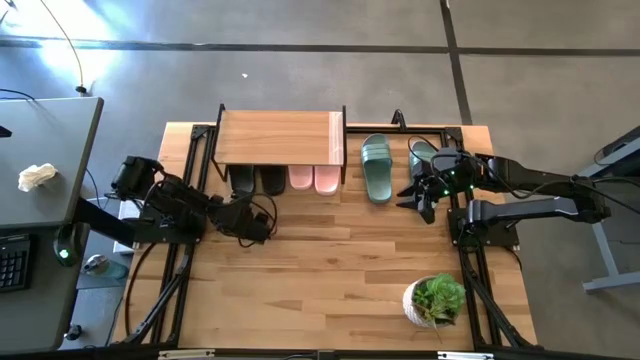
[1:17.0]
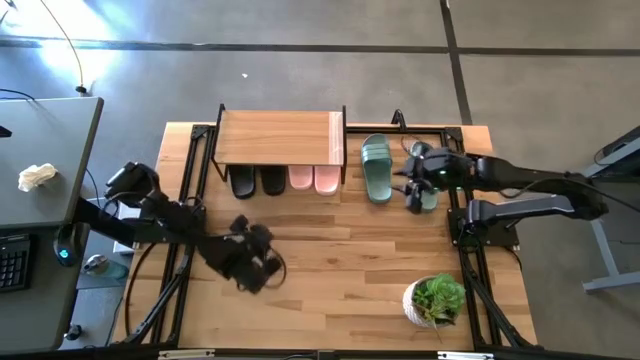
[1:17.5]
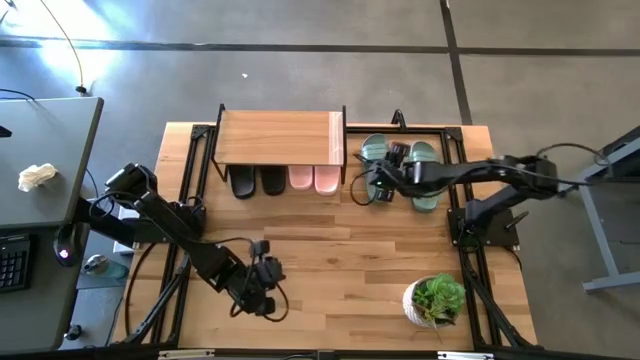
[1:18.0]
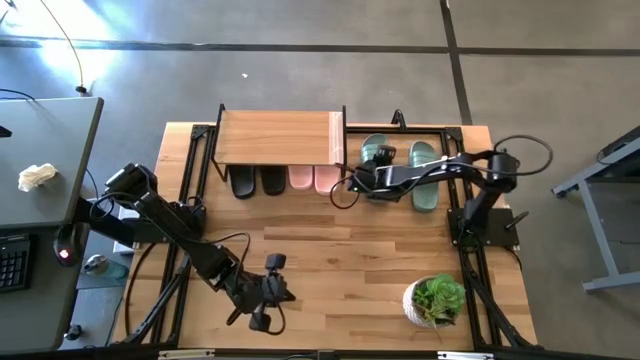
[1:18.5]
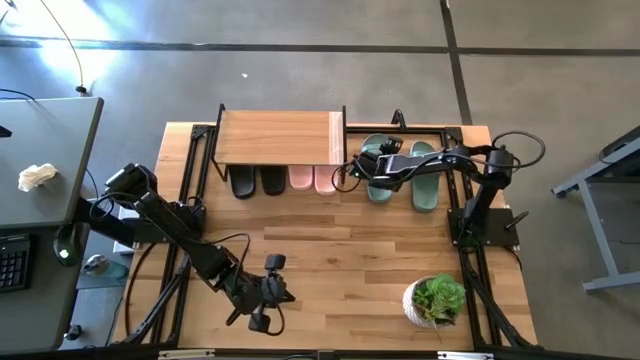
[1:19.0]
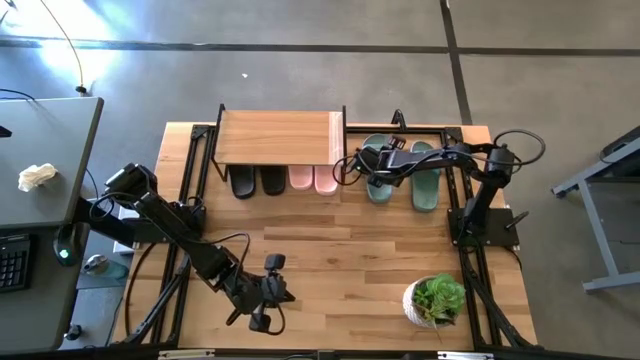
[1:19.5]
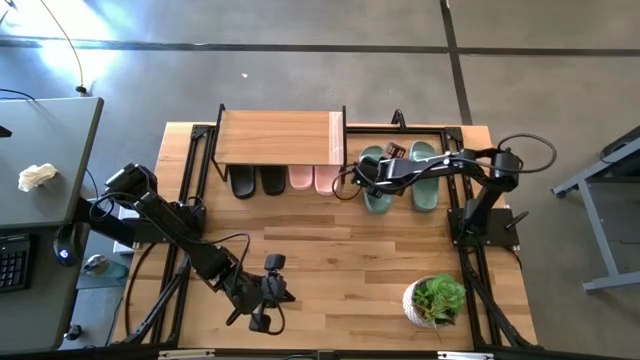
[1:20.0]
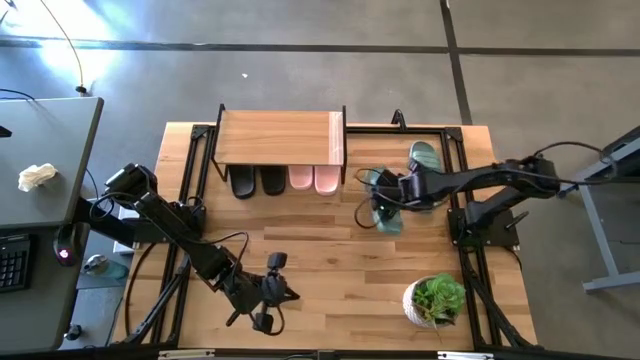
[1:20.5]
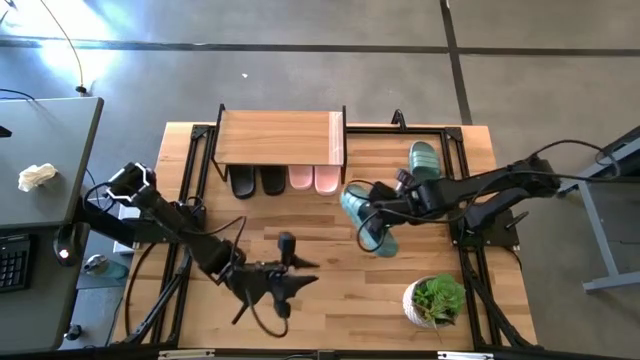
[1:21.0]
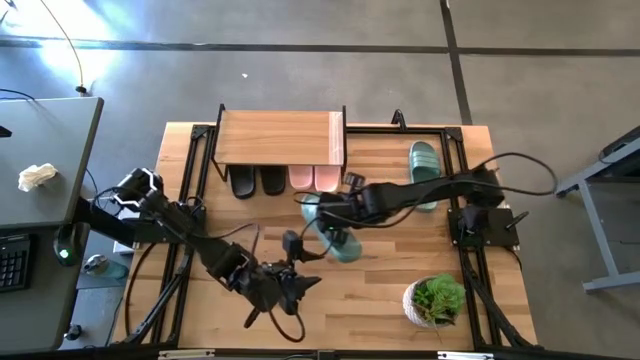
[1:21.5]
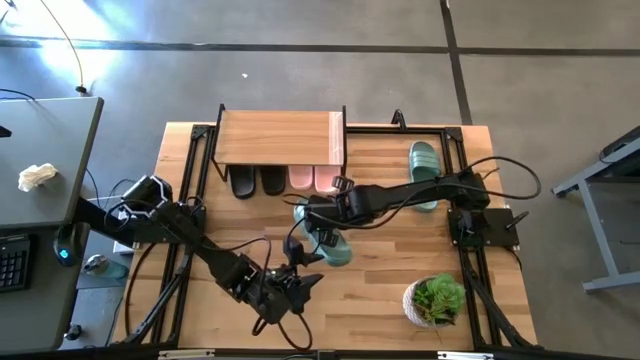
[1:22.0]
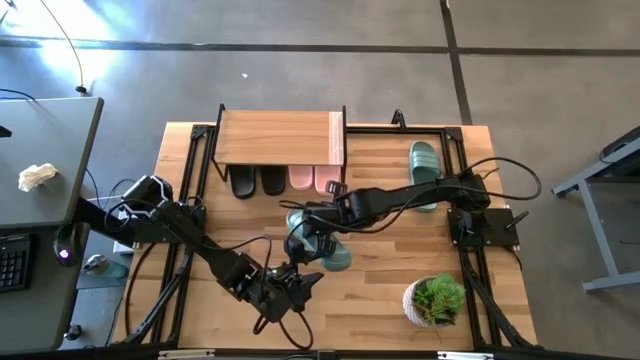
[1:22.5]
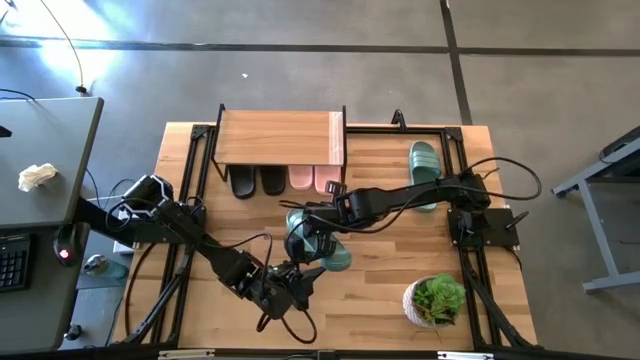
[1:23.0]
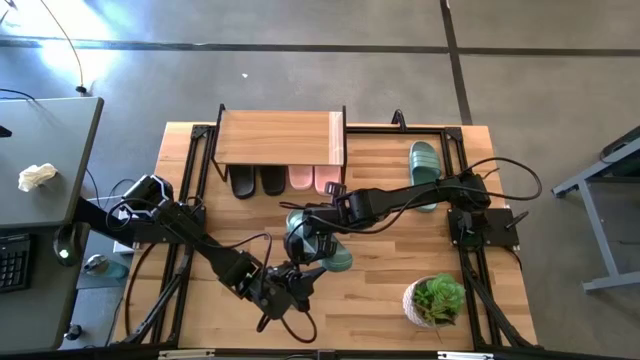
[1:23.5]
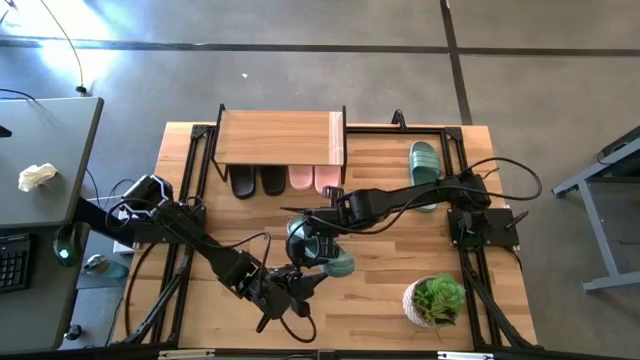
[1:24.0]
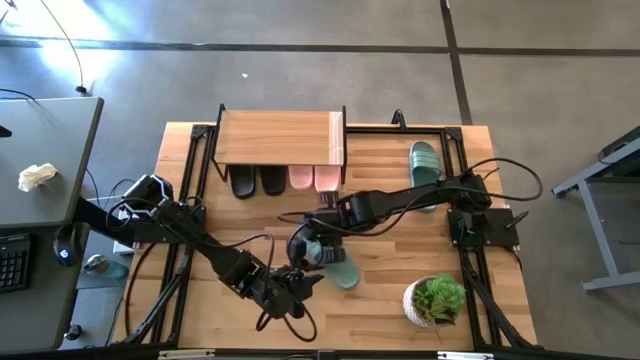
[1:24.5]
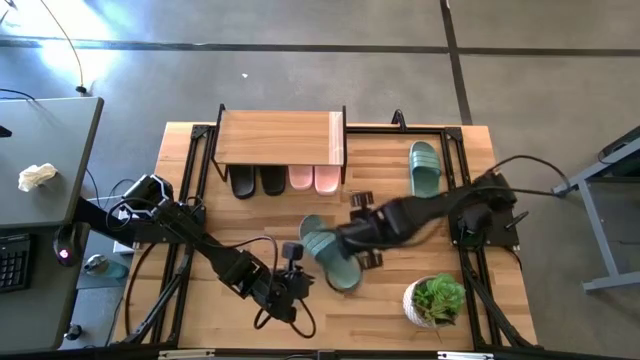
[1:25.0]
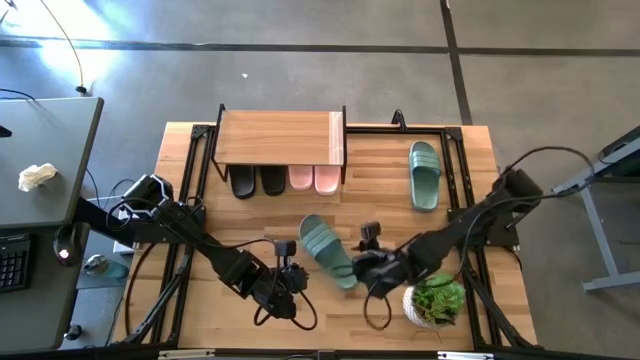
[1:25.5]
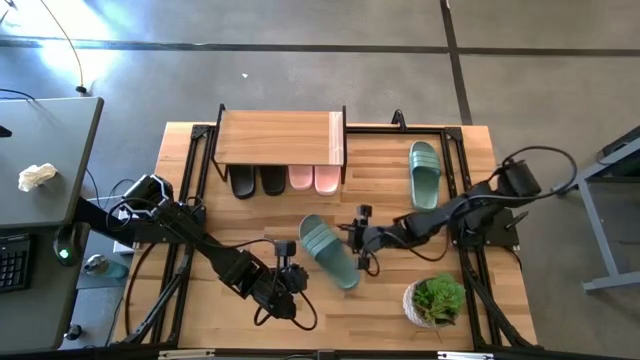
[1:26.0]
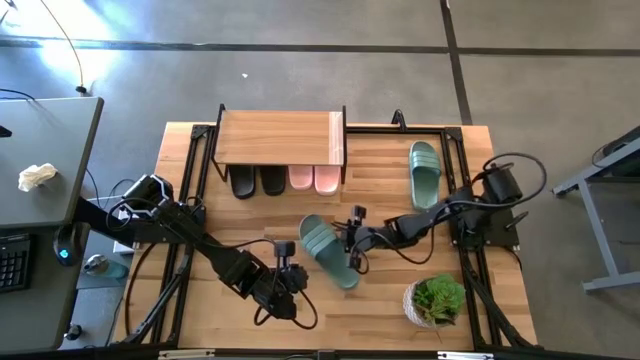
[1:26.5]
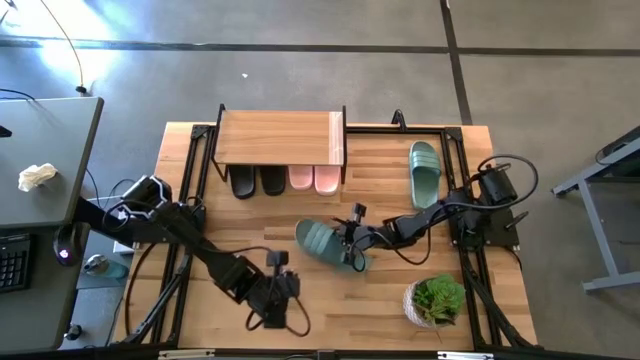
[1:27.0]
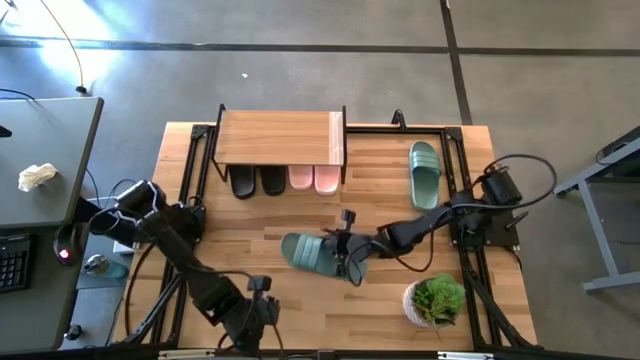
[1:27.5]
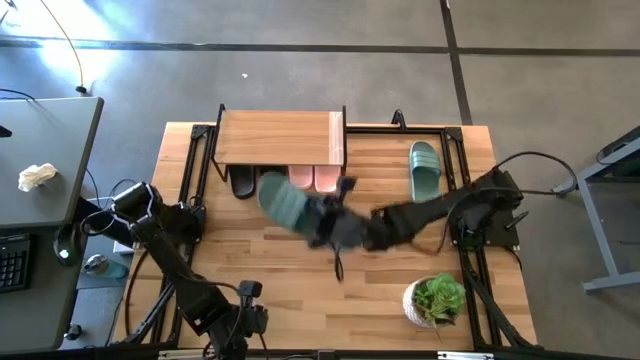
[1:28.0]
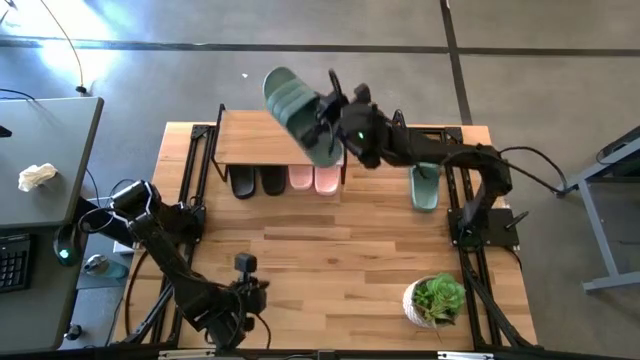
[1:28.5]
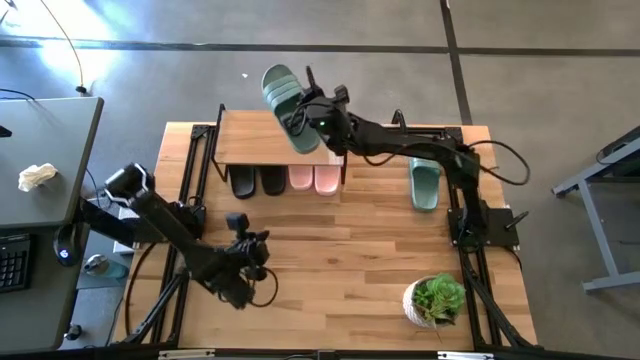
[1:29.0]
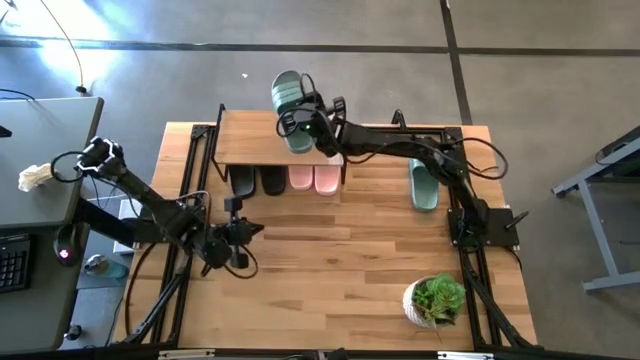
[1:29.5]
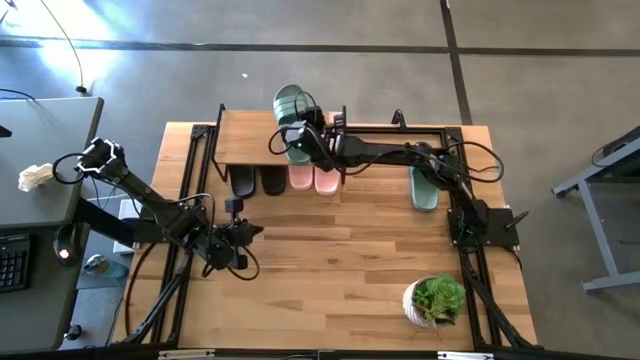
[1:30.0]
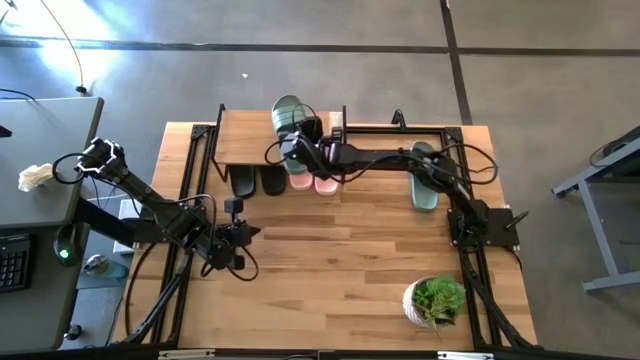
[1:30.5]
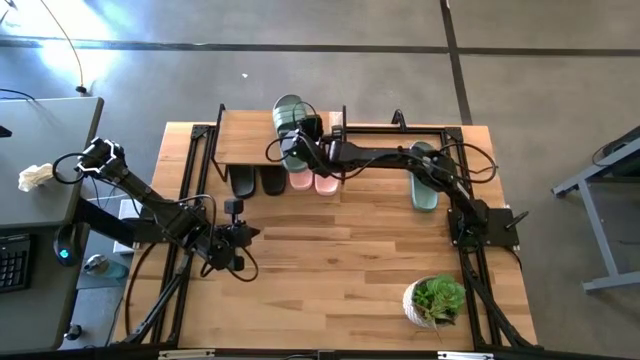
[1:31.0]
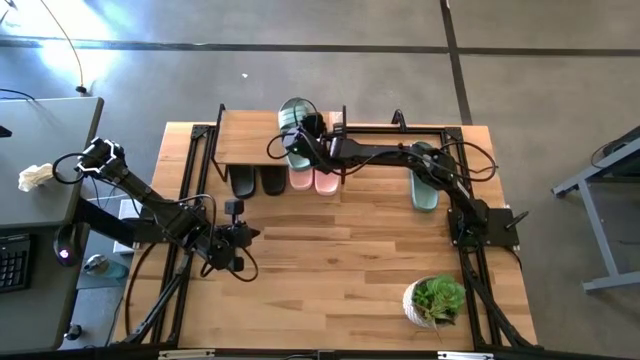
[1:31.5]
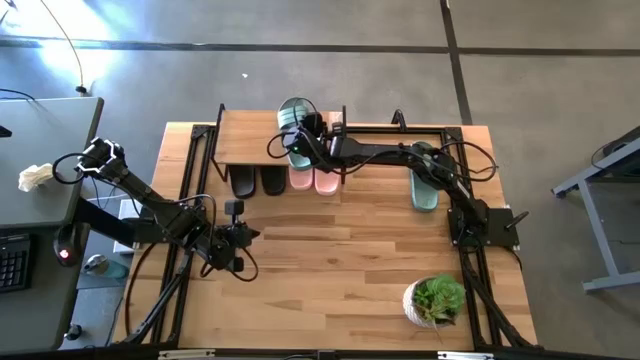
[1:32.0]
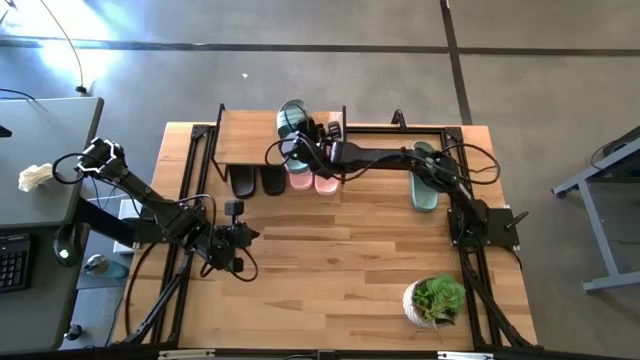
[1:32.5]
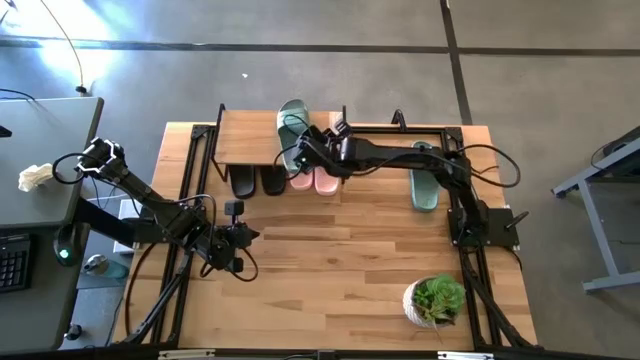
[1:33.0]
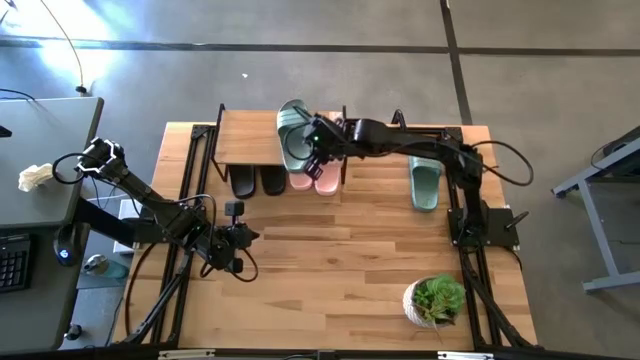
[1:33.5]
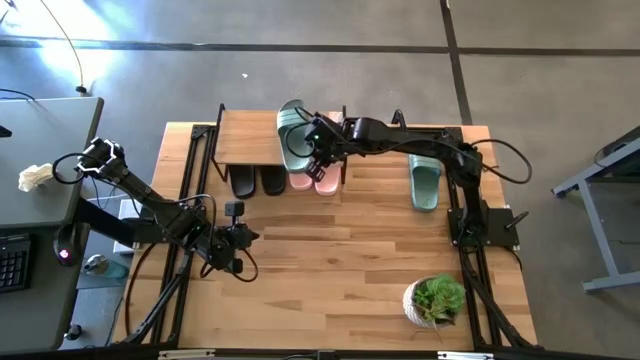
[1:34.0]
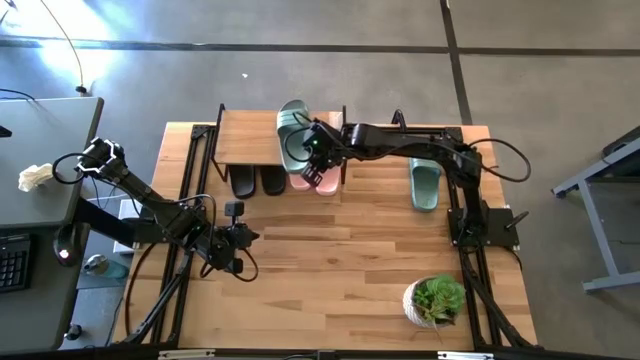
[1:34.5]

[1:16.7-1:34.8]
Task: Pick and place slides into the shelf
Put the left green slipper on the shelf
